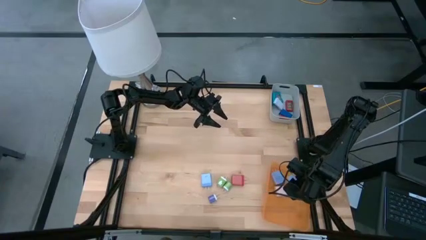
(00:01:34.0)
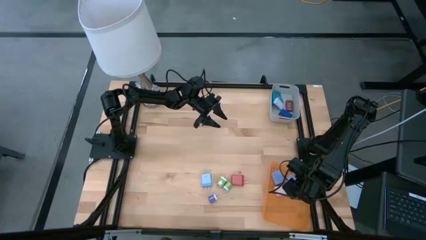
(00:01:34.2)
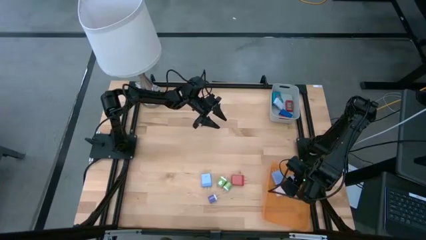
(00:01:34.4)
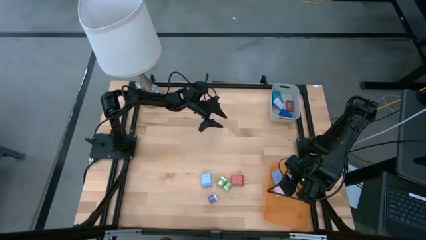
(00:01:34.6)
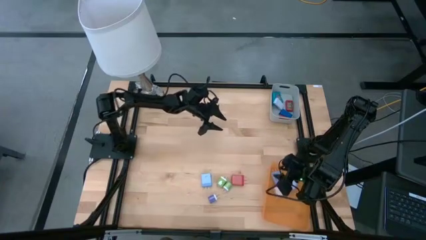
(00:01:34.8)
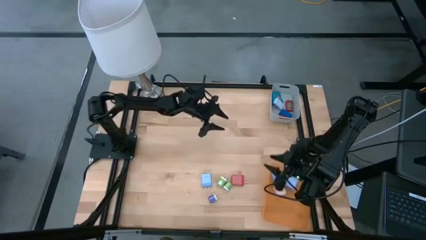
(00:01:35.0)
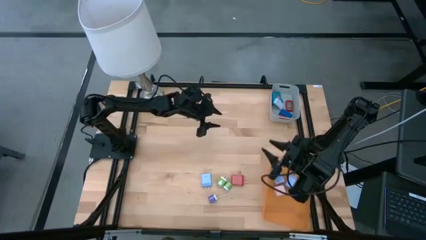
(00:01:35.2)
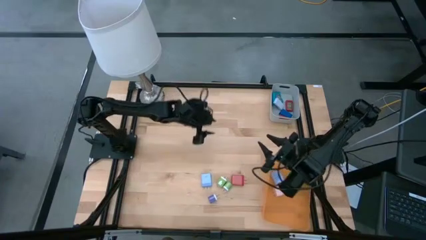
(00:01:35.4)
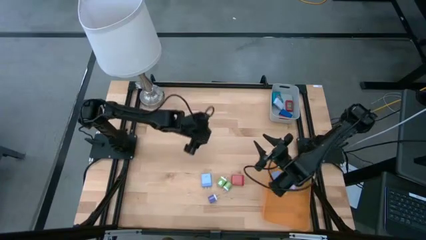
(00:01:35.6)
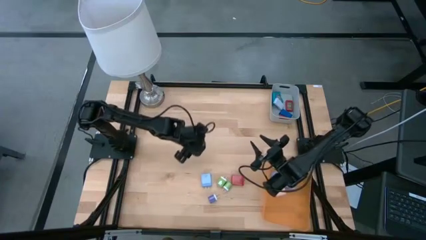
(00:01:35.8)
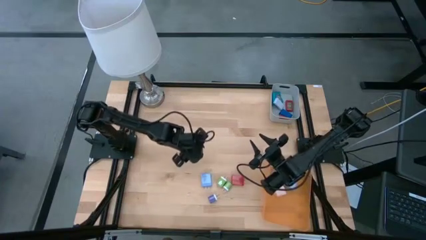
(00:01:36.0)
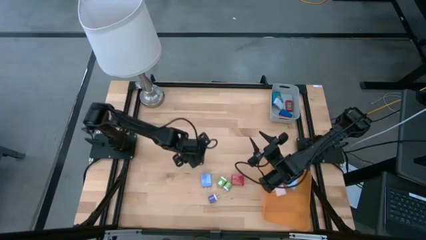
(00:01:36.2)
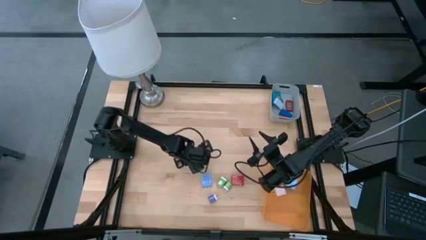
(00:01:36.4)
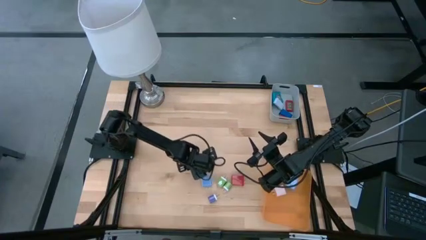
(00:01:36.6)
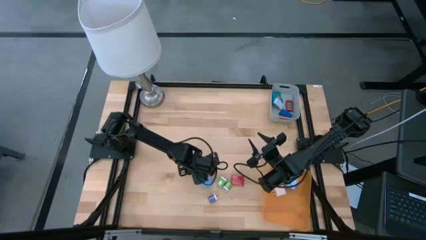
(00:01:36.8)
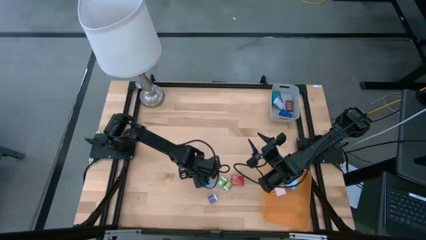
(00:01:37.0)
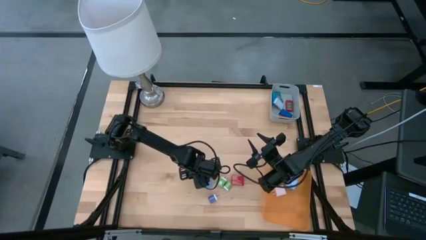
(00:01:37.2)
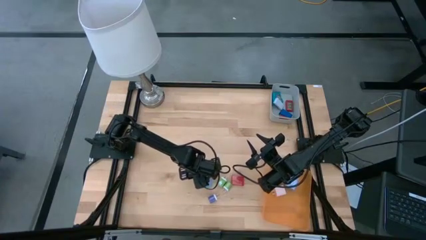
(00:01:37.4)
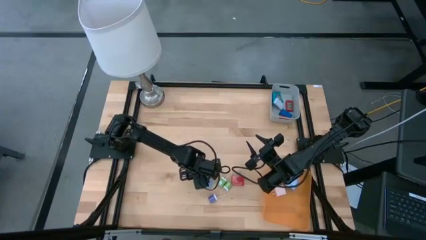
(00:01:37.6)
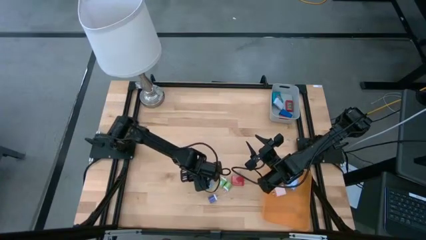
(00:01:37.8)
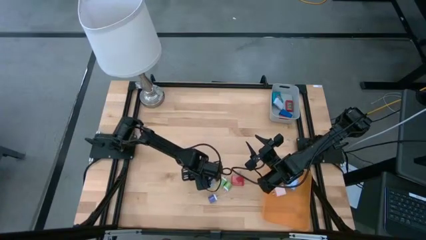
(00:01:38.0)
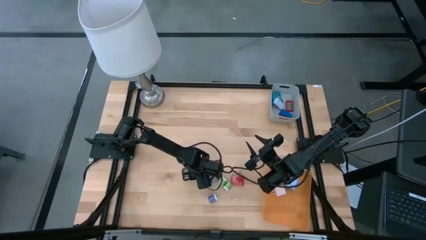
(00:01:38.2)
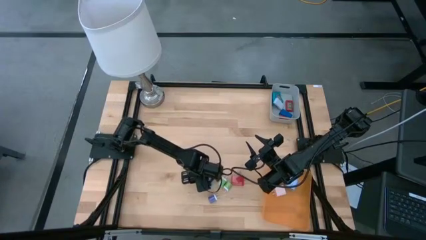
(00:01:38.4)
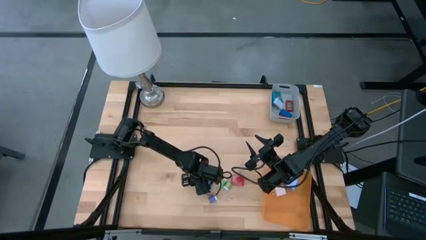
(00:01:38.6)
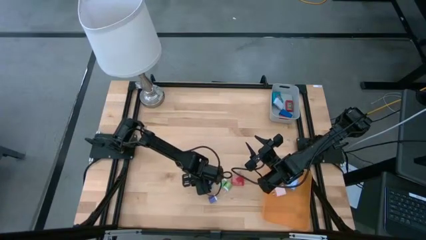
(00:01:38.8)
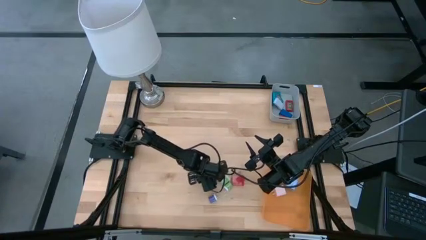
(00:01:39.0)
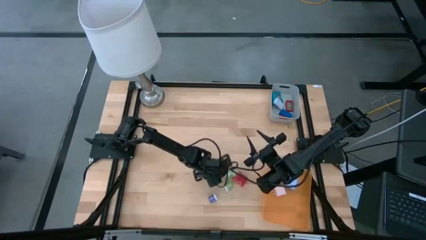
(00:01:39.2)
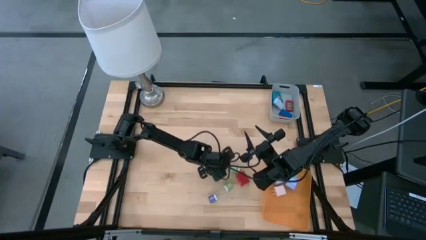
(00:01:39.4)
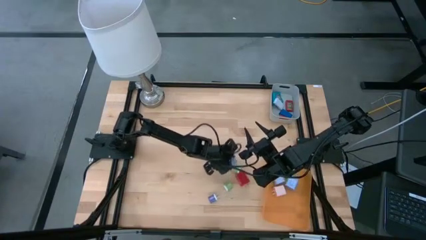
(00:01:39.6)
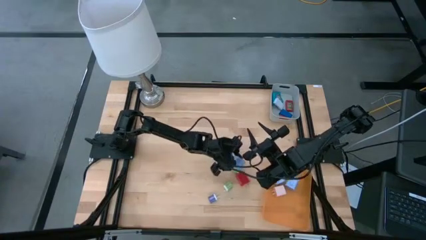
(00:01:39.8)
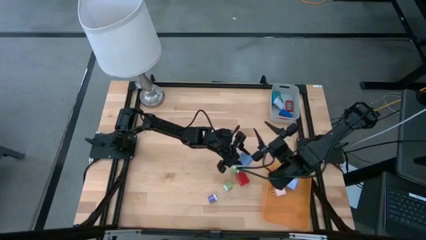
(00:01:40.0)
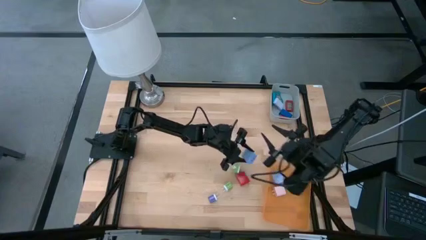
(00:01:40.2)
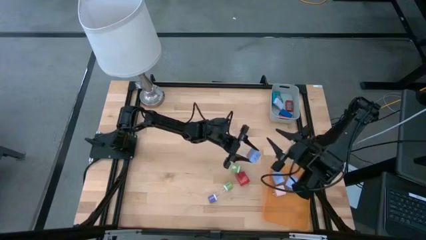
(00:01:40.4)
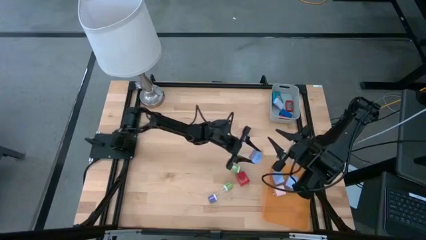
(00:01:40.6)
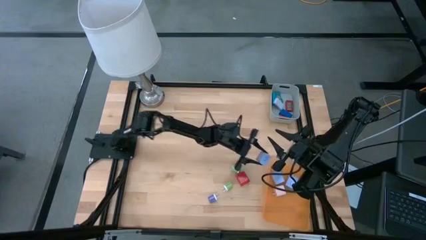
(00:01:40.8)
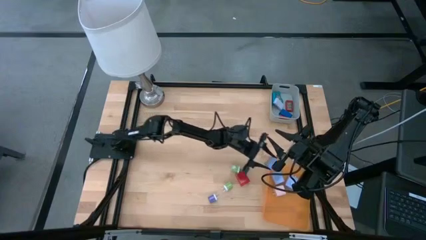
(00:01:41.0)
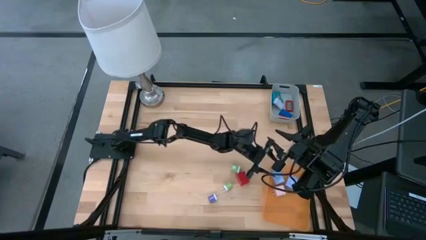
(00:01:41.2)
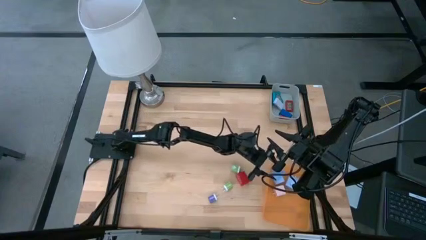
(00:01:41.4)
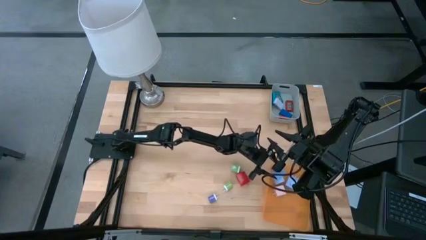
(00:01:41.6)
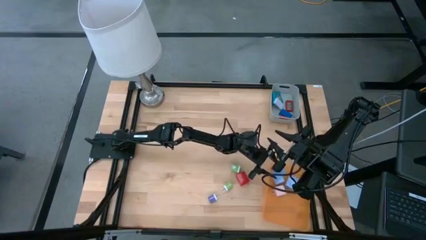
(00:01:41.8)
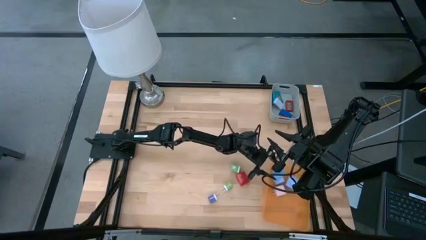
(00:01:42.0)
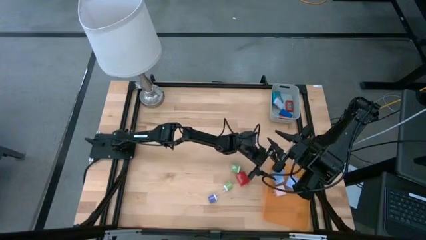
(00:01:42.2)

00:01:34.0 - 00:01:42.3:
Task: Pick & Place Office items
Put the light blue charger adapter into the orange bin

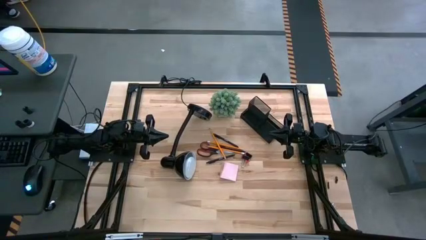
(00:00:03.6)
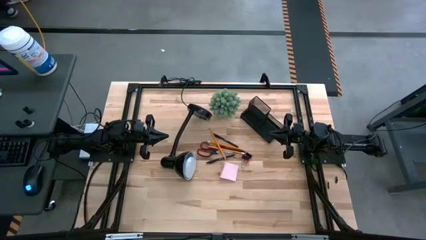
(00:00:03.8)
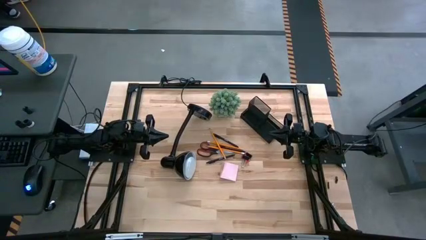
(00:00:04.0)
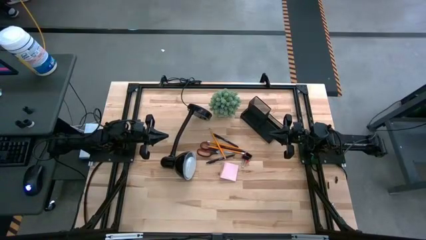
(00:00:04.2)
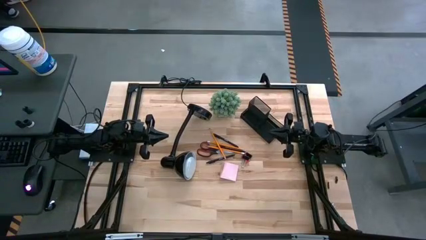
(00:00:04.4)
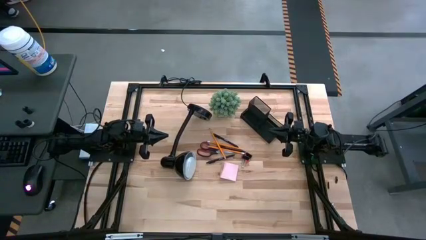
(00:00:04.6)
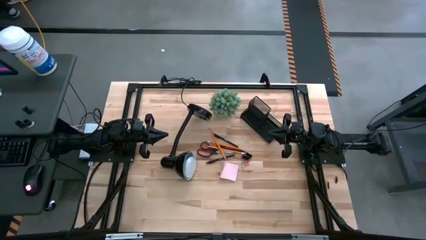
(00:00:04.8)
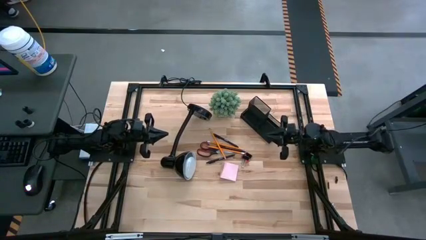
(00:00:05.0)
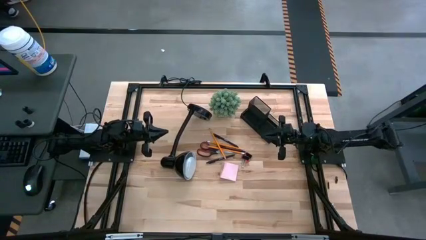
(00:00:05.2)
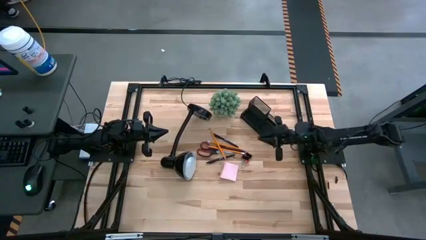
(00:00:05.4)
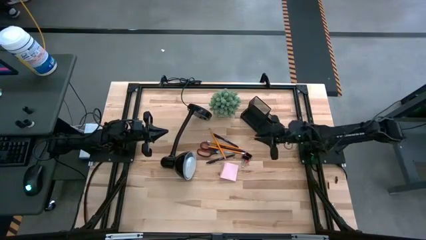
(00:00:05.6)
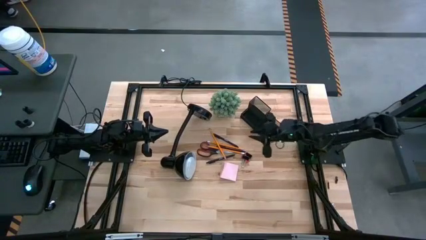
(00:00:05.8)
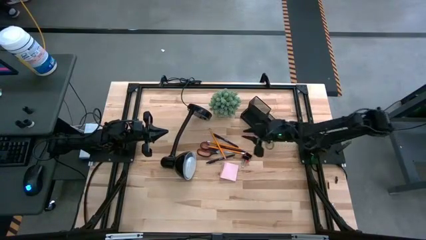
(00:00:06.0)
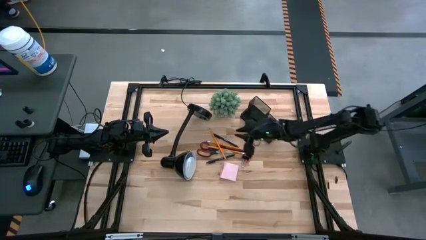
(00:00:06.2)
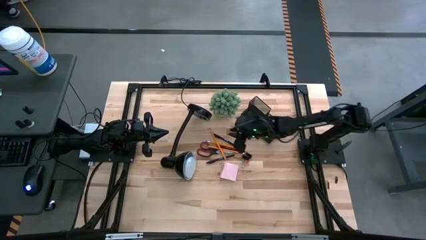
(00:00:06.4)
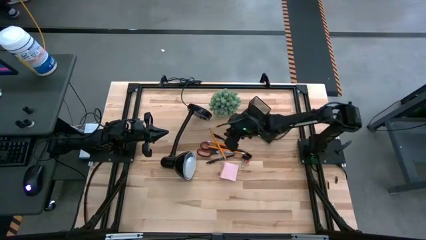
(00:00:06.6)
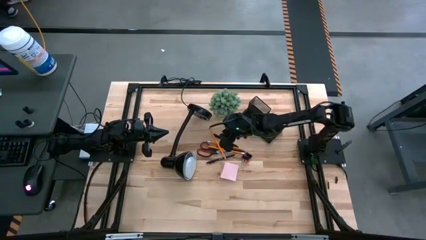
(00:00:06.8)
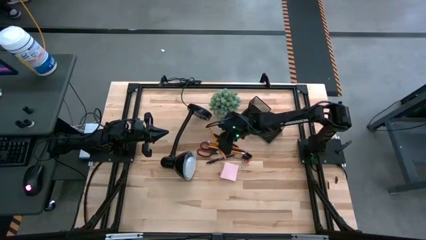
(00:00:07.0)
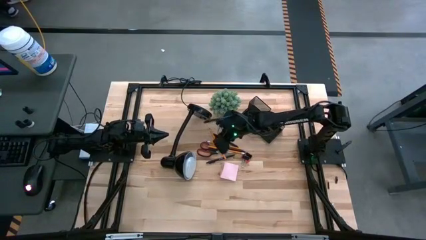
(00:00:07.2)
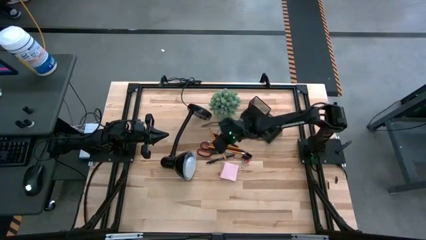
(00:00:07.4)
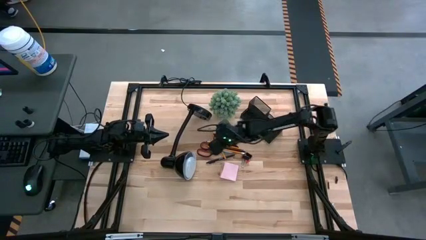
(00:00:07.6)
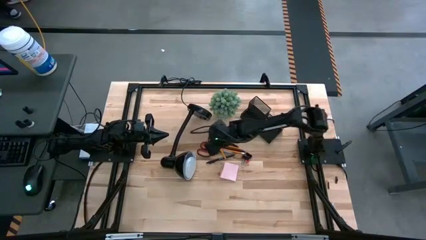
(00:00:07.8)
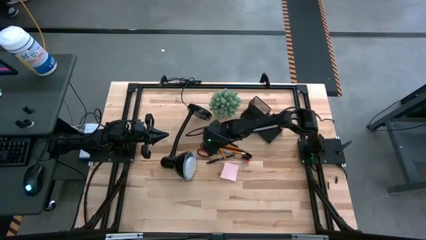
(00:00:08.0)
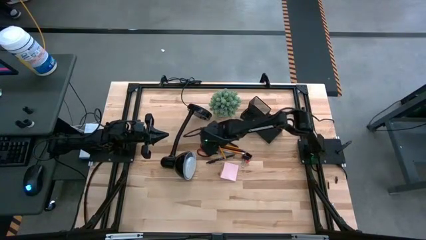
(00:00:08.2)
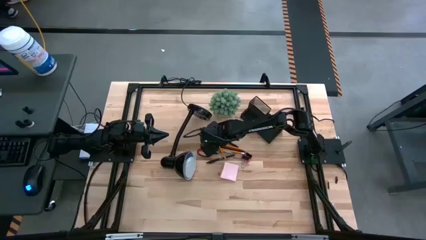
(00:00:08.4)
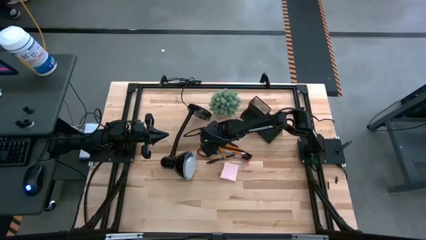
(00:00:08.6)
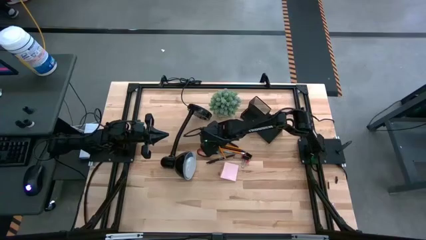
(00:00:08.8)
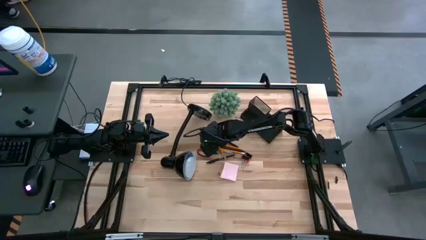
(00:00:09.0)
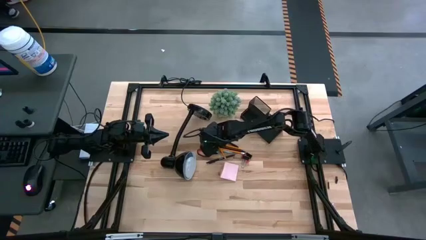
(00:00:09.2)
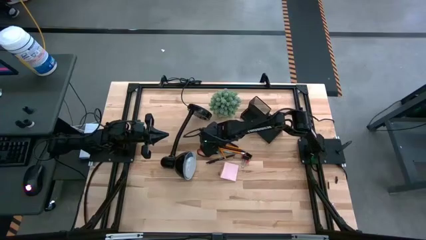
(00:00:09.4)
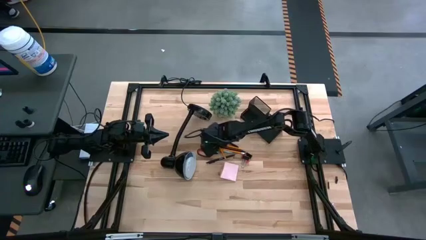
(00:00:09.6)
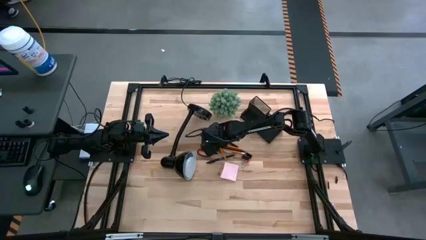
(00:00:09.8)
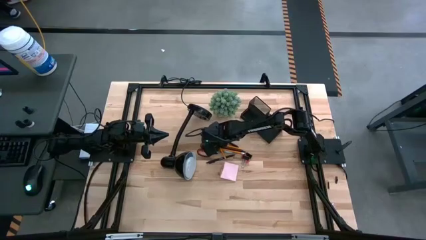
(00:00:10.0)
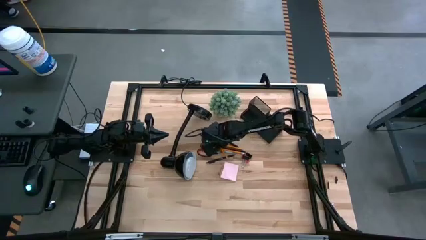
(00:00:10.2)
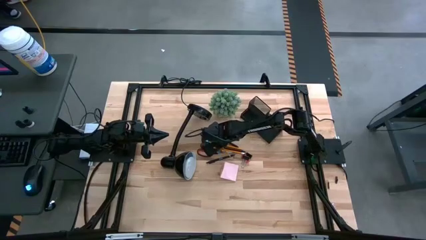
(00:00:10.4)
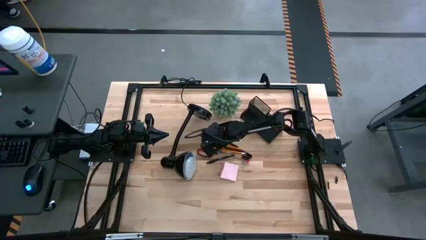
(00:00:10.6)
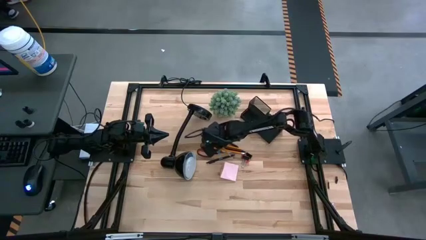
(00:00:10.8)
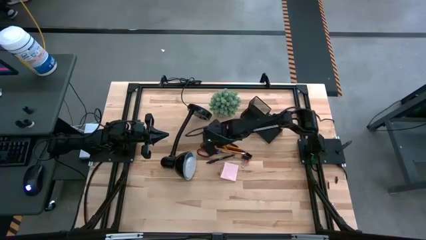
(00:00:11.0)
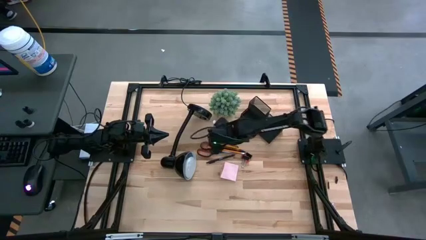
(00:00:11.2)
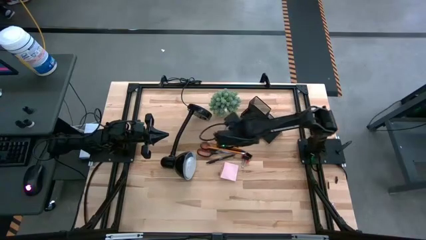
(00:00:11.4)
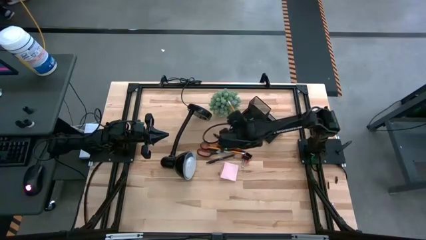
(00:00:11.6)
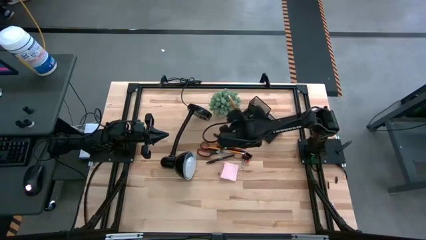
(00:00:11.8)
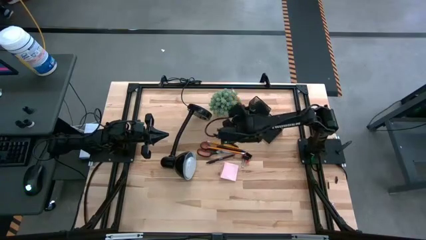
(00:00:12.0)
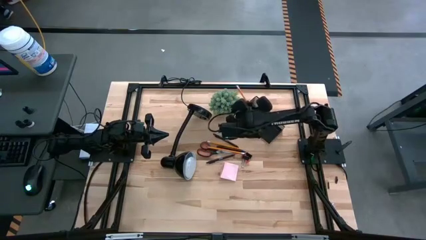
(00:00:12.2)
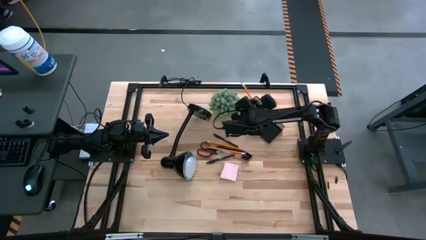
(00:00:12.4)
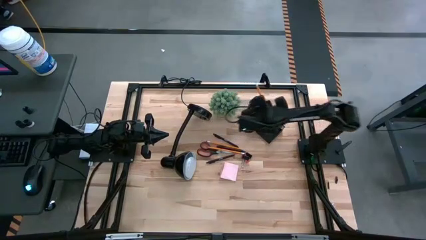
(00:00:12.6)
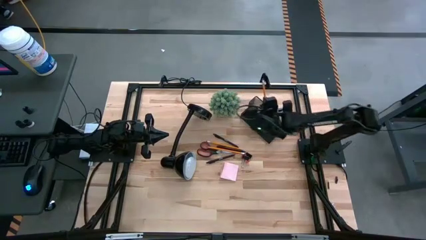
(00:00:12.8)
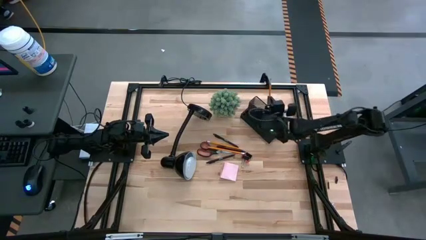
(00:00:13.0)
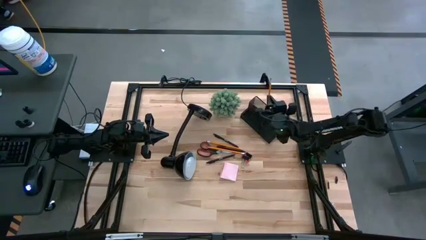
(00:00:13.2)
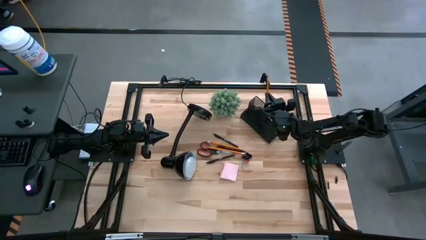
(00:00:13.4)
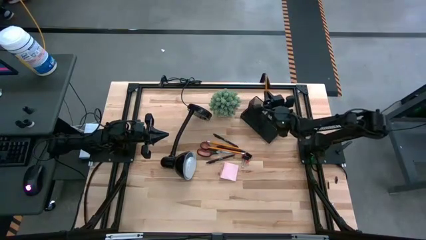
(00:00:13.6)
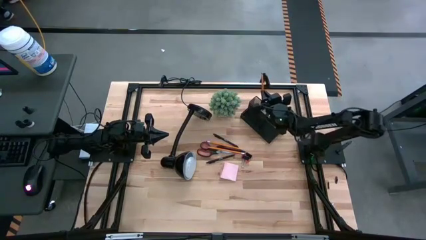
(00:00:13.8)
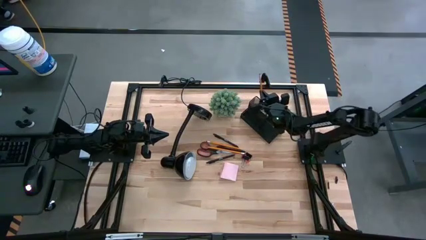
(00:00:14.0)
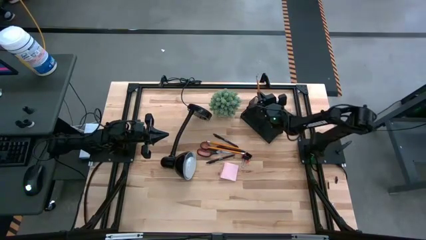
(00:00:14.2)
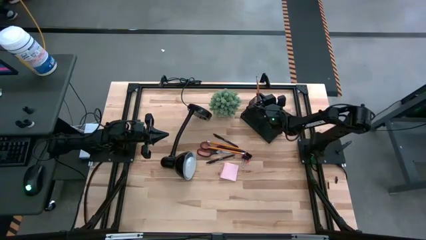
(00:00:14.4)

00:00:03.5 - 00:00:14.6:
Task: Pick and place office supplies into organizer
Put the top pencil into the top left section of the desk organizer
